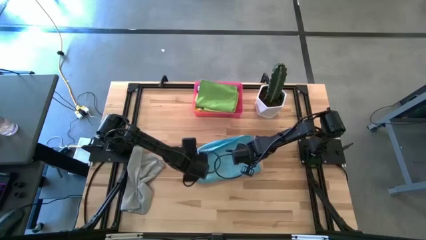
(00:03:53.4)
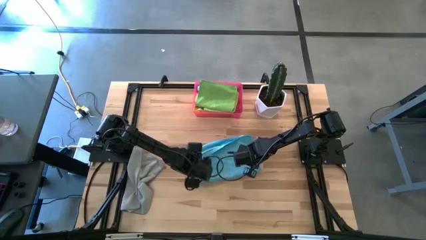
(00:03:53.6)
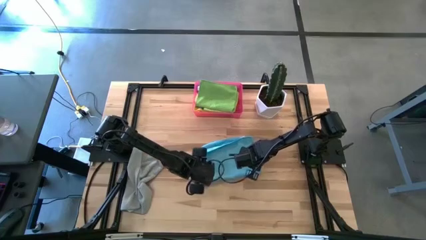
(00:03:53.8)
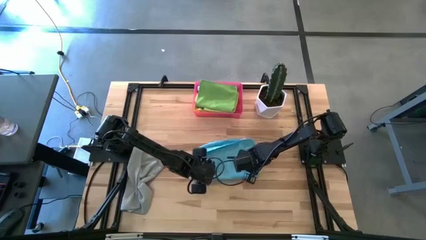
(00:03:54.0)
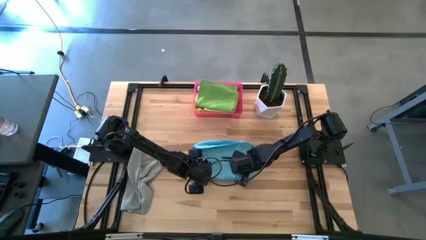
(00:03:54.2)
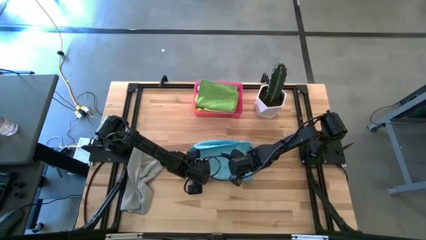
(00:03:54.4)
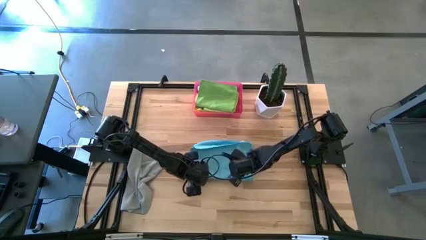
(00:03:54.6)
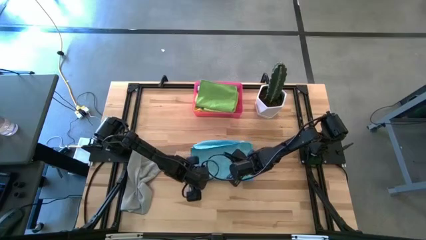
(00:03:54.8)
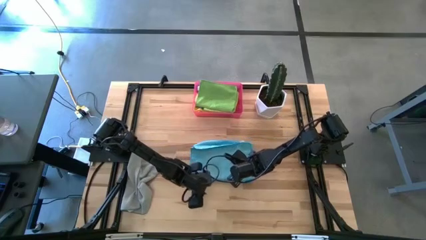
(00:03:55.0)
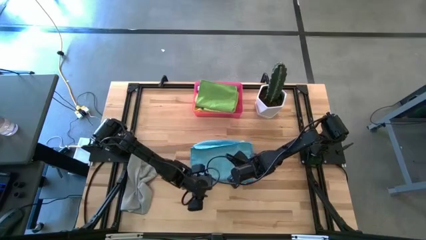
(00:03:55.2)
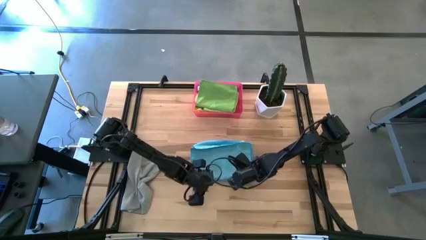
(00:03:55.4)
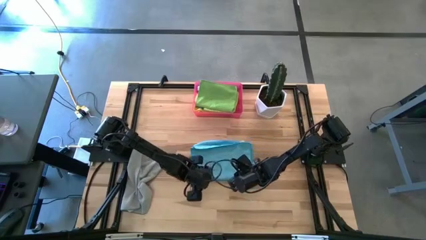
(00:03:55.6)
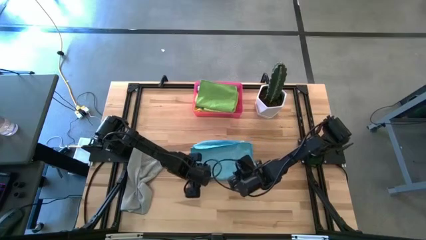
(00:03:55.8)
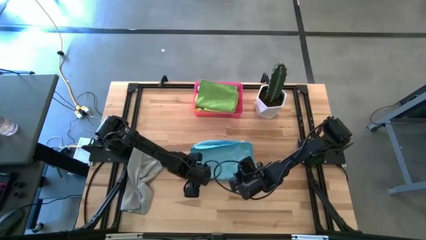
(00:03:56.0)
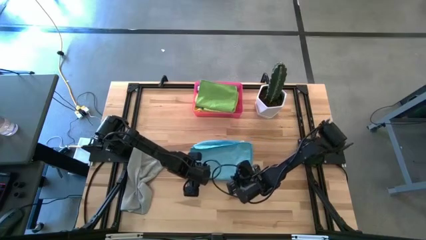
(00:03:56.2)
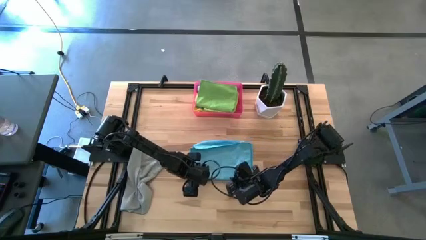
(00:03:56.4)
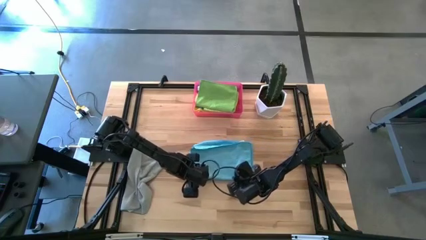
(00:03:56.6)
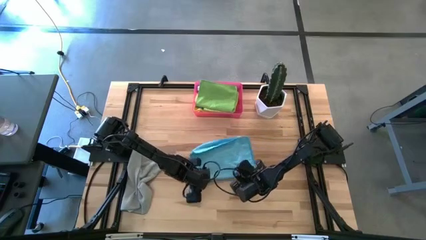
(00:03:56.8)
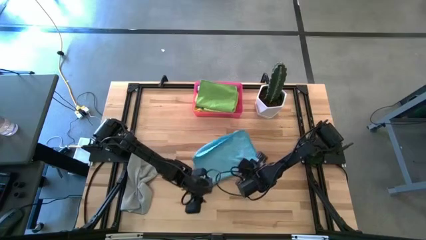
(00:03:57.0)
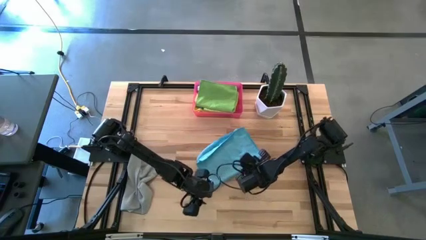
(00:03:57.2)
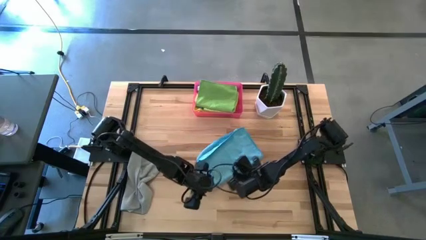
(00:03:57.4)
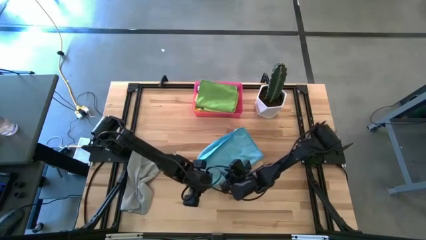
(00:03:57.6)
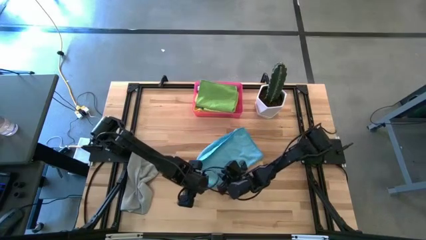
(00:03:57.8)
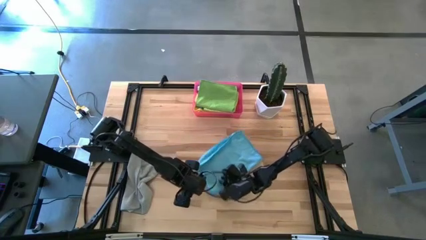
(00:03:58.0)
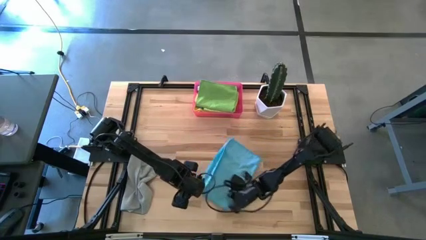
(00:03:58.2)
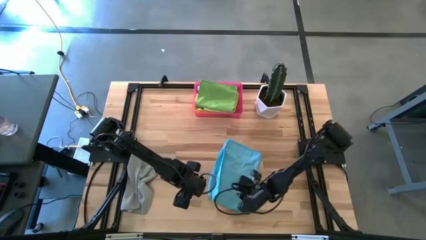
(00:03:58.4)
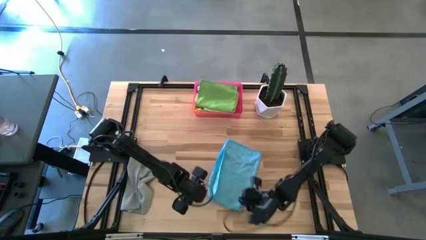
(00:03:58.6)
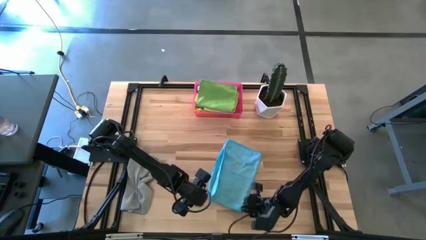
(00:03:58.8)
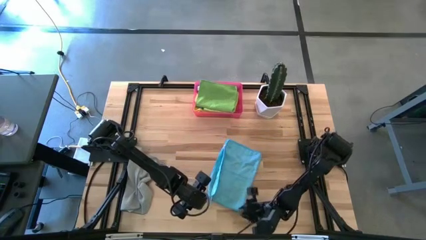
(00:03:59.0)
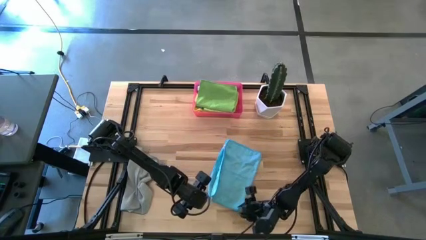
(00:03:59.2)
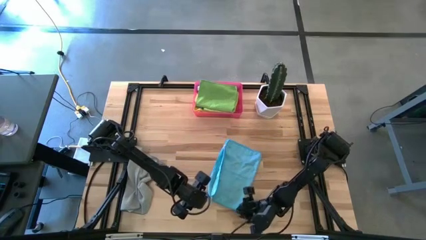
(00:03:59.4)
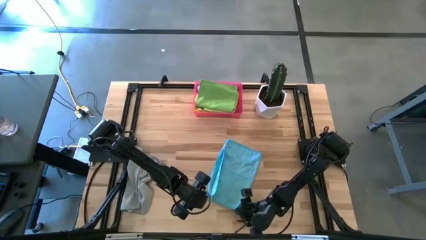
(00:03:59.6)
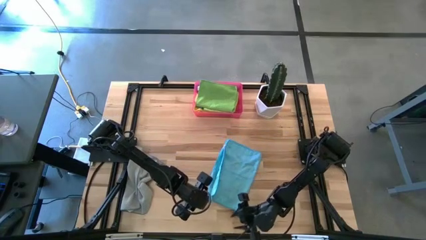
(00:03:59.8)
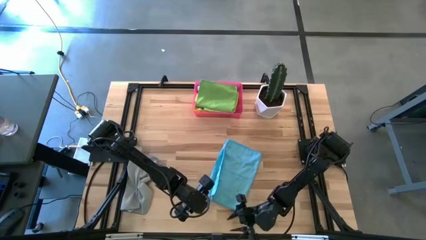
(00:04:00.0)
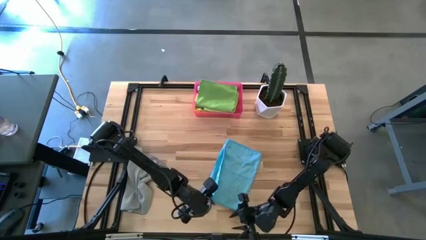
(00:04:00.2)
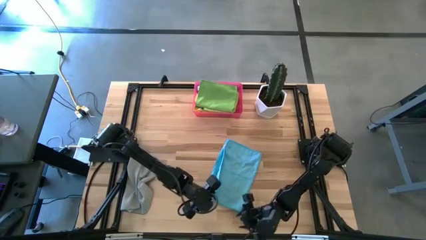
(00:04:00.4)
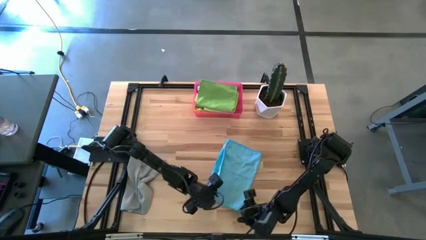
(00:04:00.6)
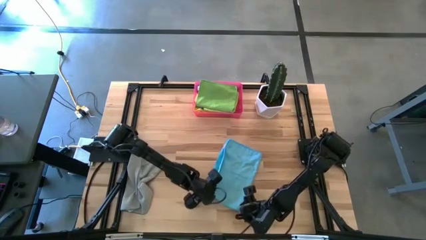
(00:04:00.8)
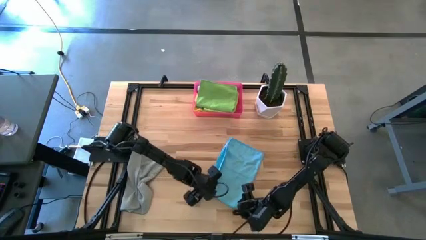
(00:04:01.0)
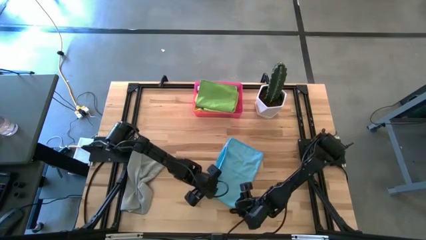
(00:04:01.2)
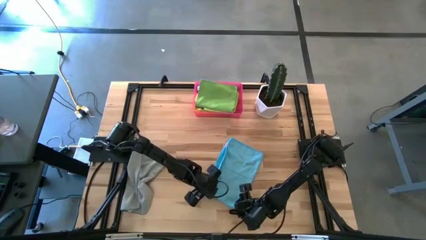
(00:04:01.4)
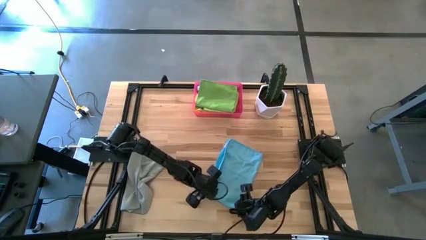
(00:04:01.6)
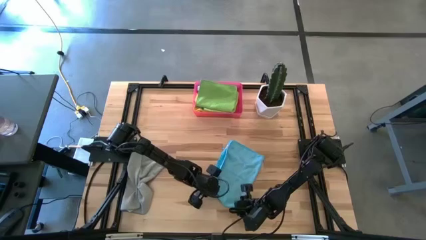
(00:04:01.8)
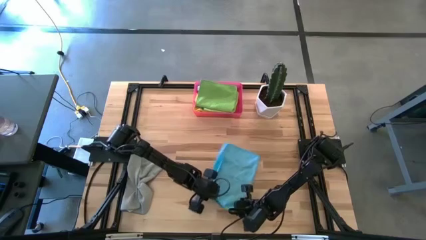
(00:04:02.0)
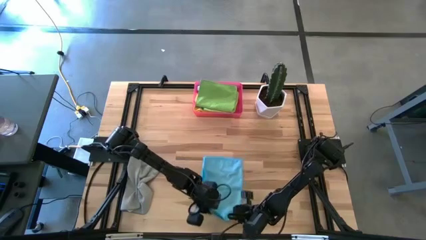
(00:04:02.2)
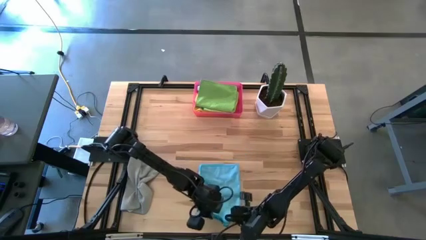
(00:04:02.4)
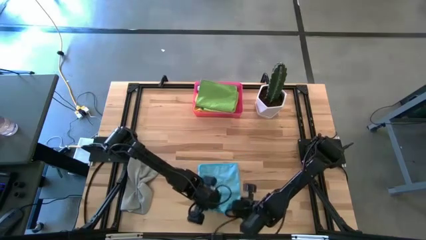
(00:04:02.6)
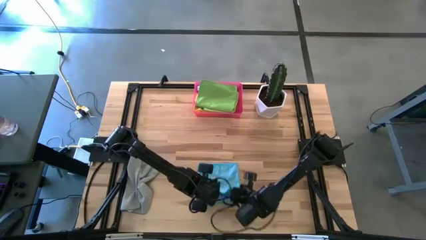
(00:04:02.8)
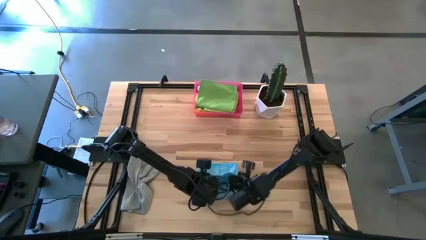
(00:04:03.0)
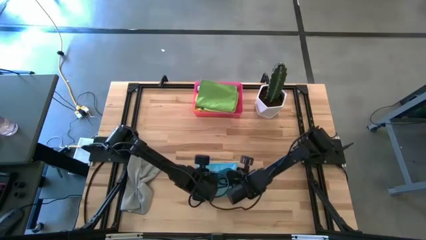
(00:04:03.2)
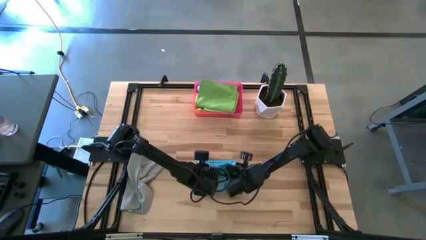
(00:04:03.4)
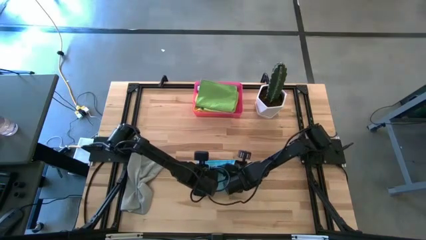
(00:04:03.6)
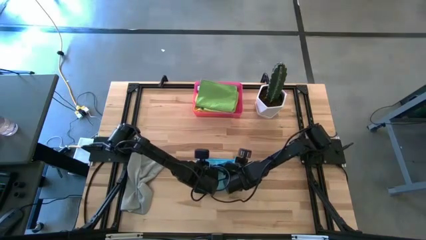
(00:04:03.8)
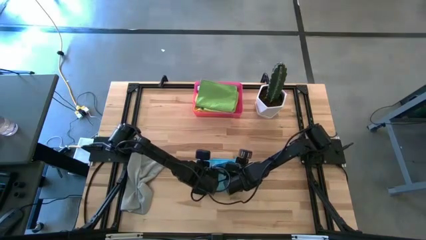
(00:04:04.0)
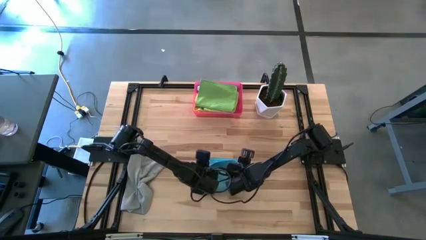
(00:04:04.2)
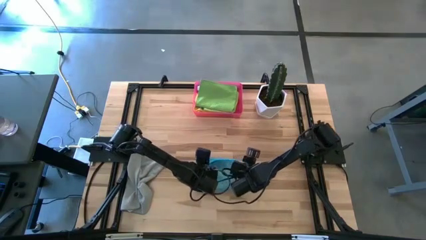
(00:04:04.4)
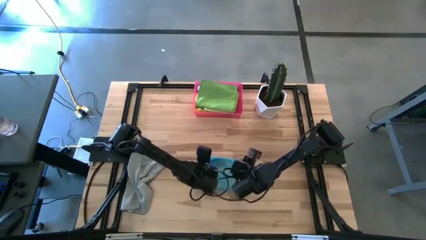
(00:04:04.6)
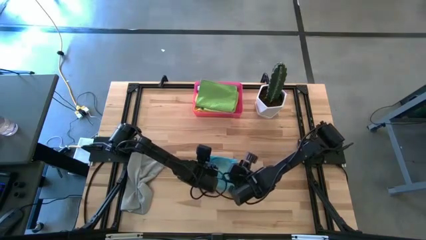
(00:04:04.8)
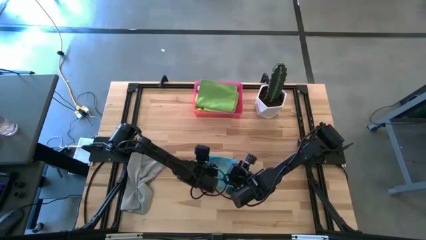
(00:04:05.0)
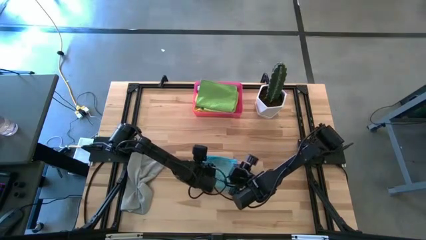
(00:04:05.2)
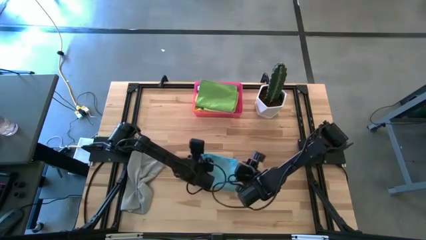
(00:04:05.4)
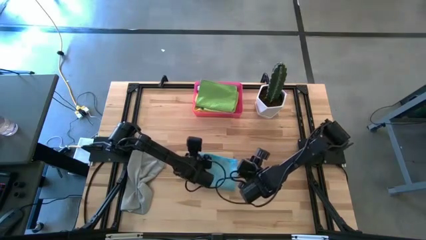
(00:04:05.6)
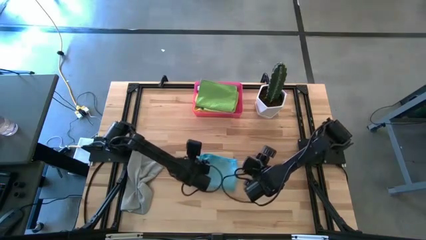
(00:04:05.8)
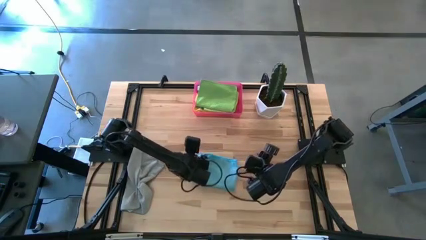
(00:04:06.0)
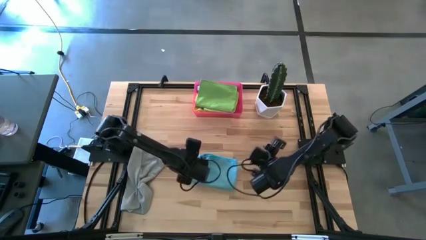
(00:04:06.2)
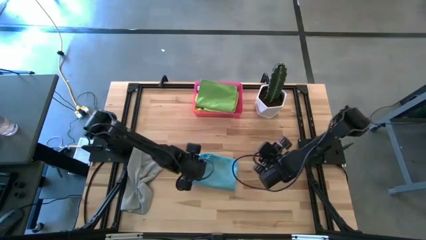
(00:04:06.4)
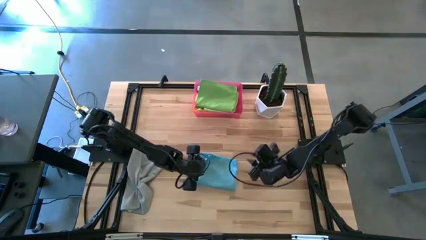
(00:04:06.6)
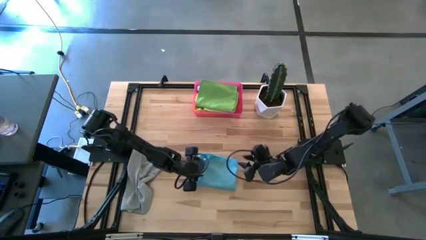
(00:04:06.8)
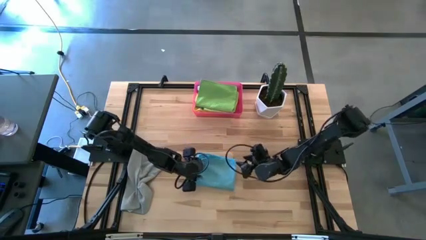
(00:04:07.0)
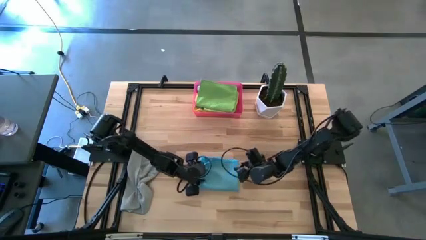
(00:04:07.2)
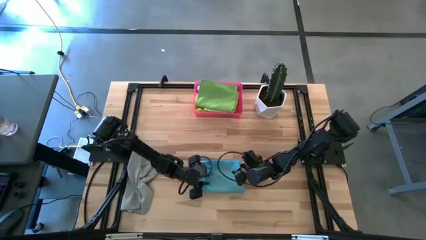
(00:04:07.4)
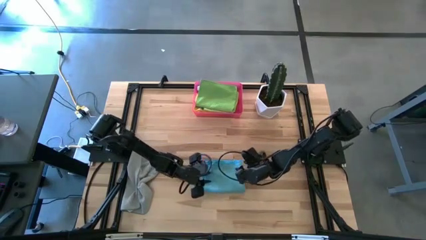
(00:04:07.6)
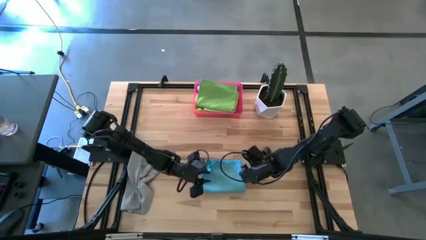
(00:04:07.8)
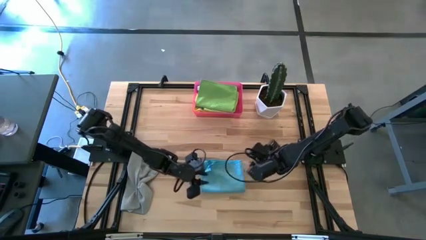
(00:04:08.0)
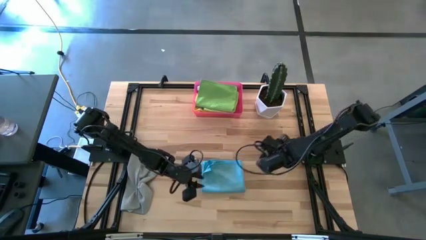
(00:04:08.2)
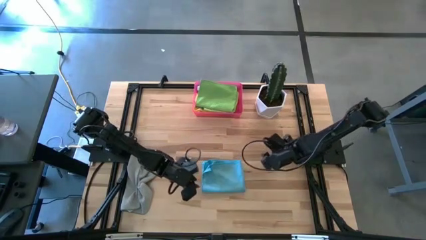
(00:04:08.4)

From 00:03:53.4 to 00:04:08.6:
Task: Fold microfiber towels
Fold the blue microfiber cloth on the table

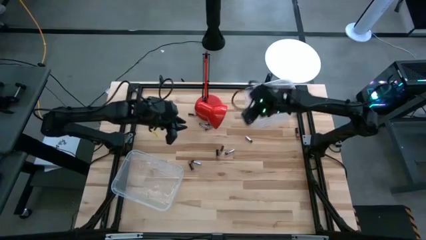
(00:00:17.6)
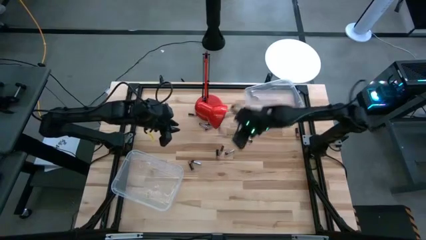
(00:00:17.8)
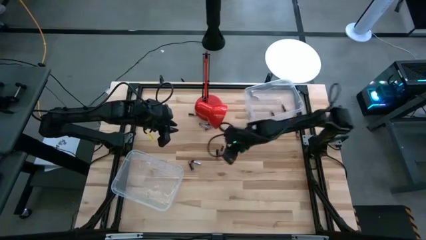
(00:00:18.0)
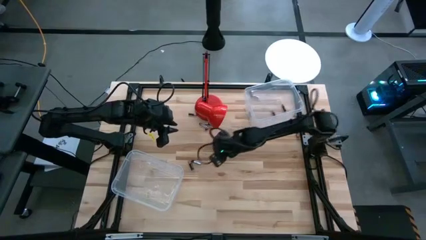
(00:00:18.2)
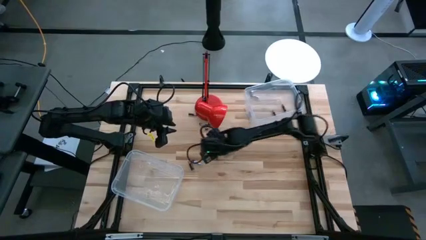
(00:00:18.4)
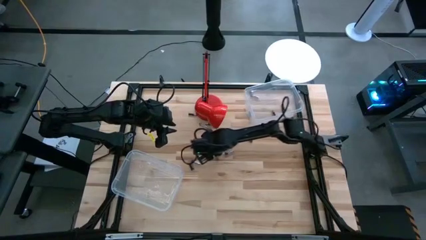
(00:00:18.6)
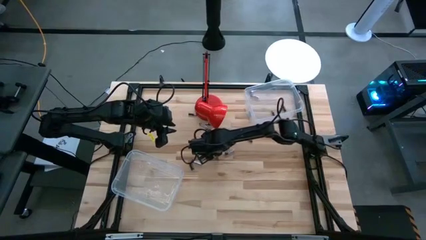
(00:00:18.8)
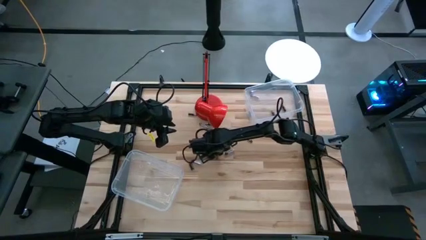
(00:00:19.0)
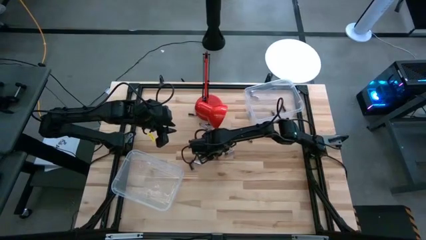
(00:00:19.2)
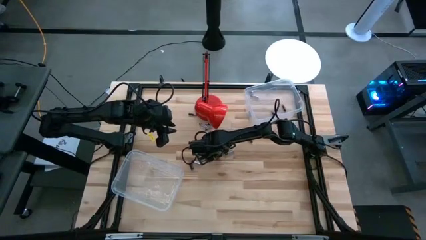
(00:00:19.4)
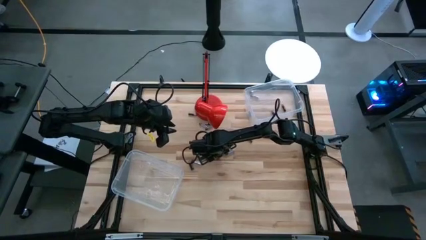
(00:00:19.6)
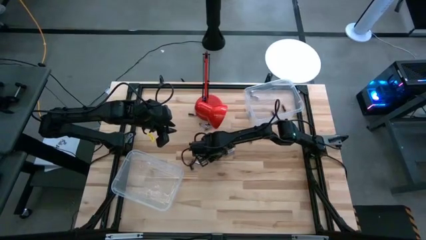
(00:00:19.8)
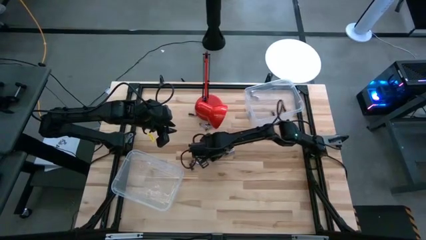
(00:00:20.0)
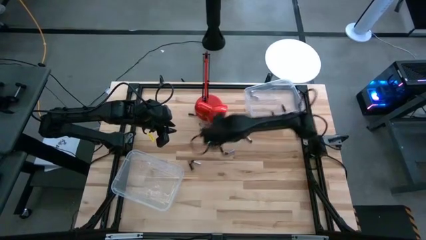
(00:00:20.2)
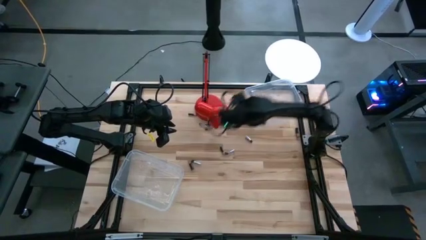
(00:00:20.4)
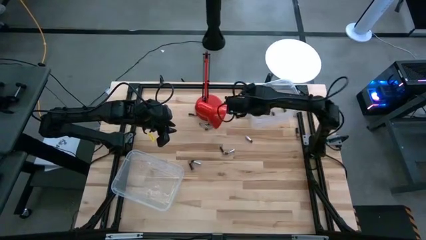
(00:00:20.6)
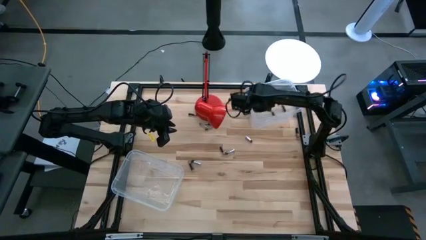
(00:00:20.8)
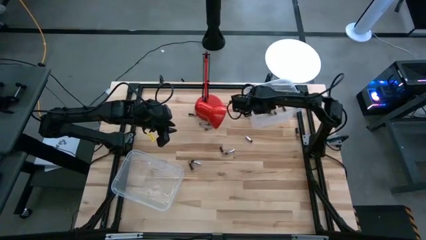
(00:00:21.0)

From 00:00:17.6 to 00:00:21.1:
Task: Sort batteries
Put the black battery into the top transparent bin
